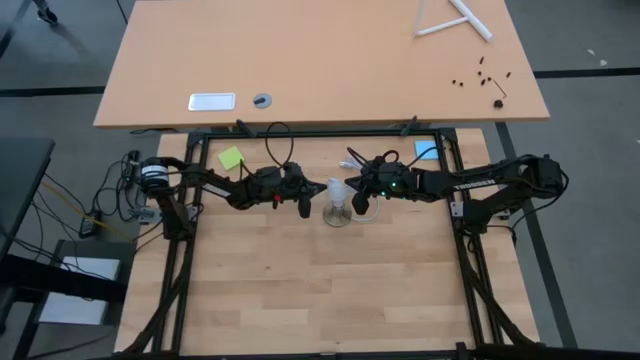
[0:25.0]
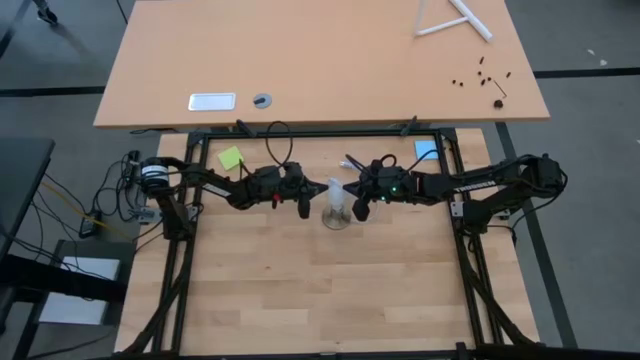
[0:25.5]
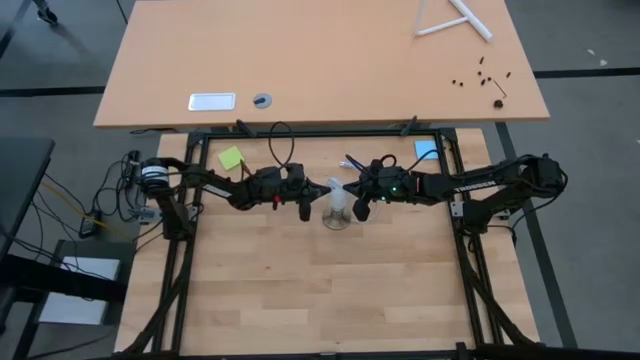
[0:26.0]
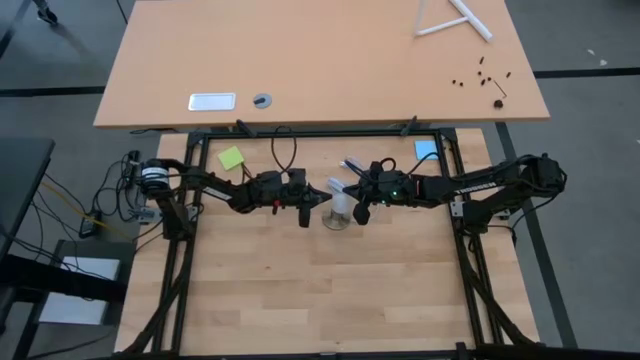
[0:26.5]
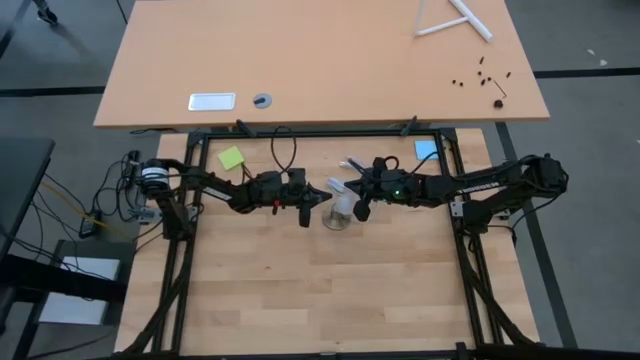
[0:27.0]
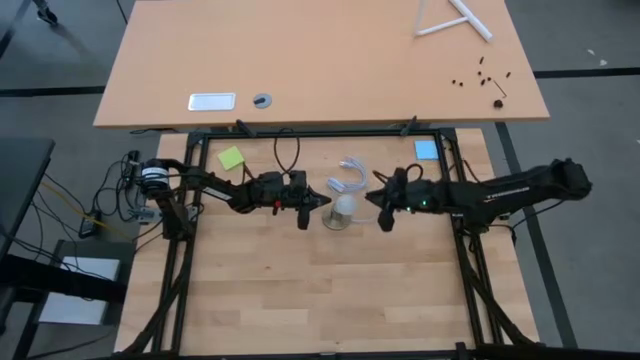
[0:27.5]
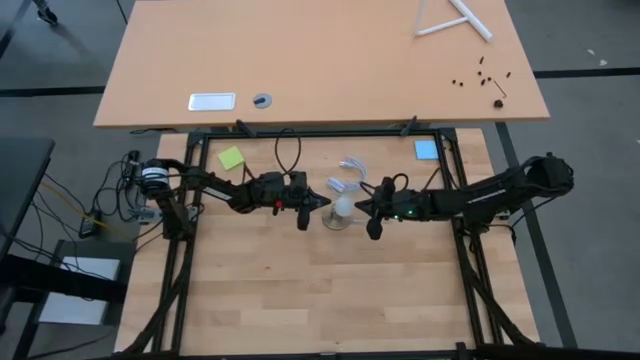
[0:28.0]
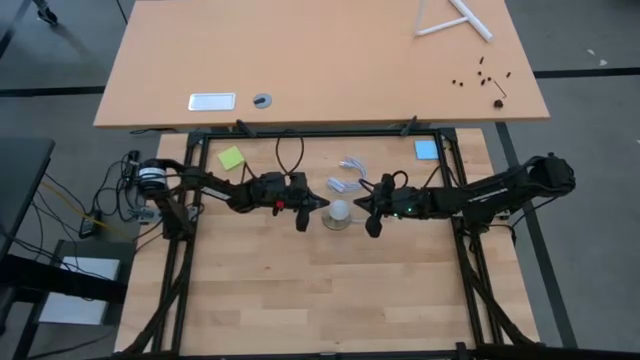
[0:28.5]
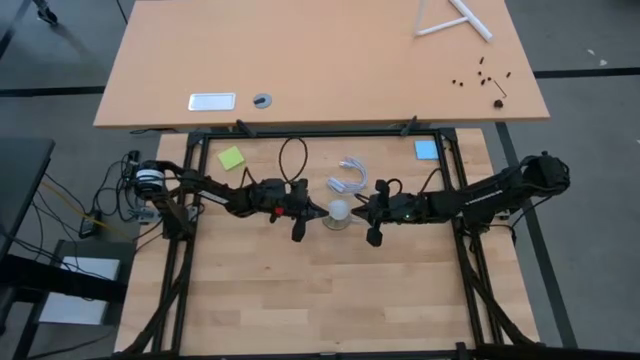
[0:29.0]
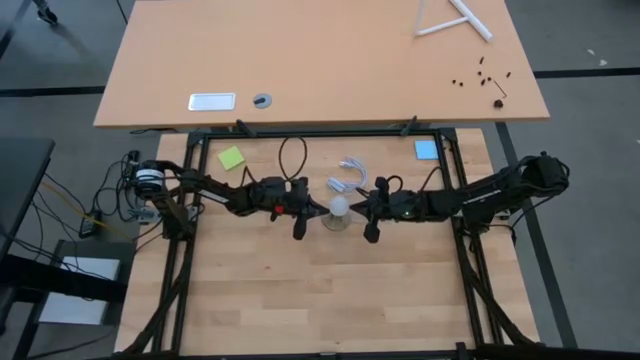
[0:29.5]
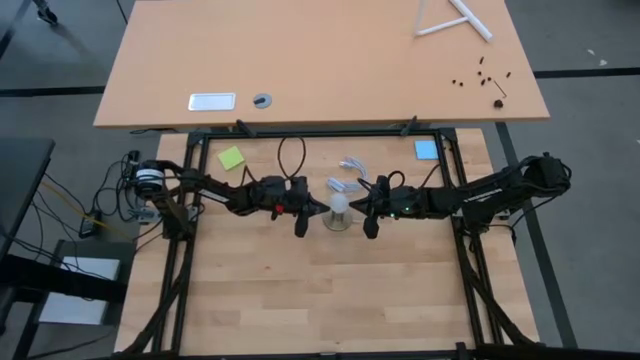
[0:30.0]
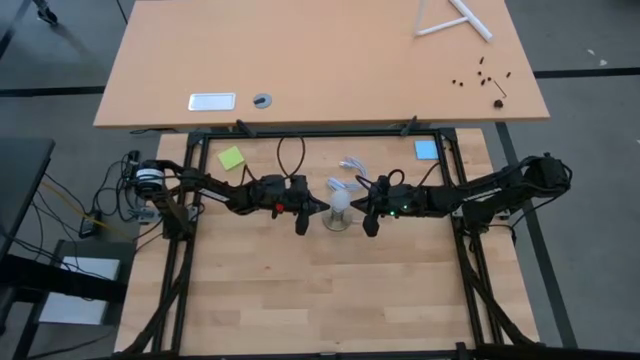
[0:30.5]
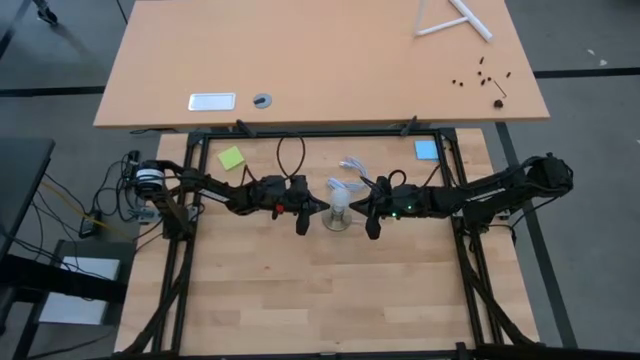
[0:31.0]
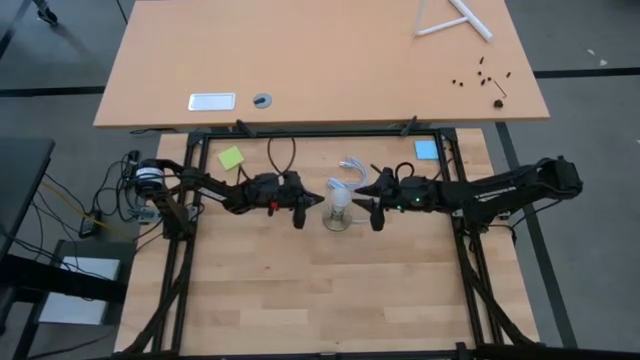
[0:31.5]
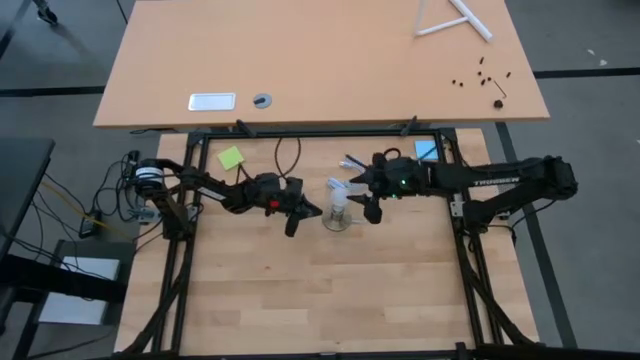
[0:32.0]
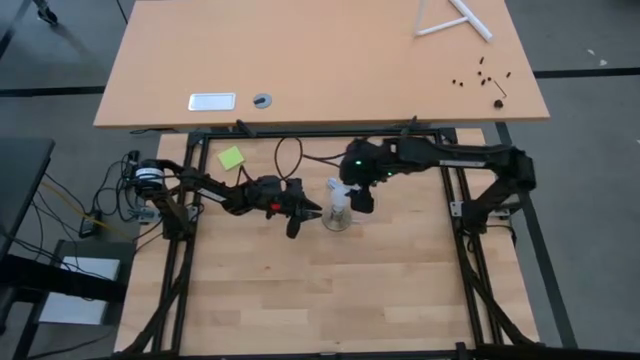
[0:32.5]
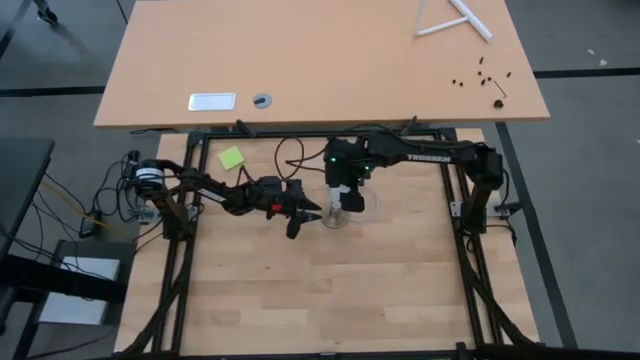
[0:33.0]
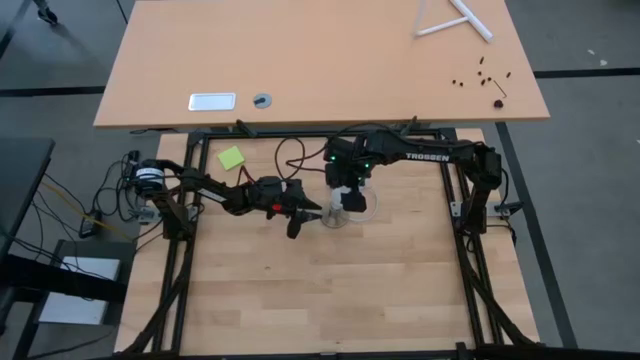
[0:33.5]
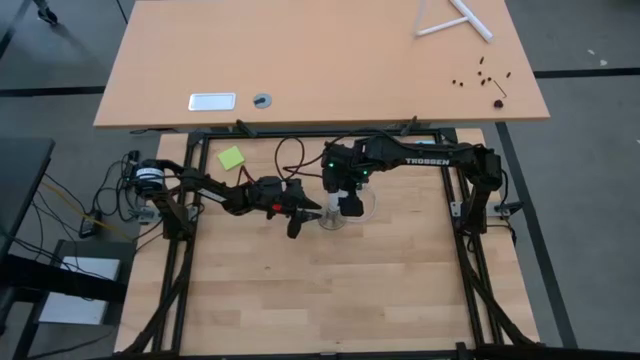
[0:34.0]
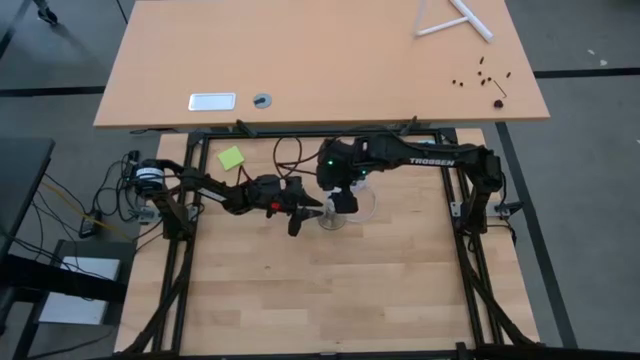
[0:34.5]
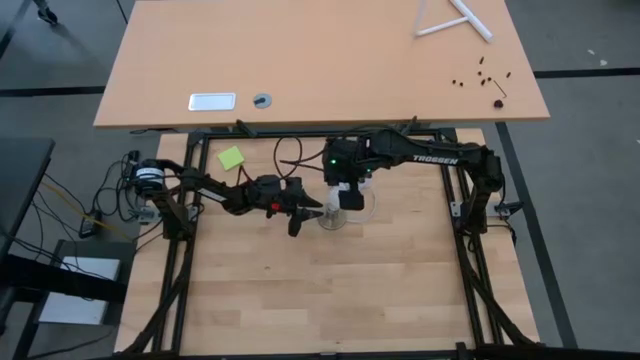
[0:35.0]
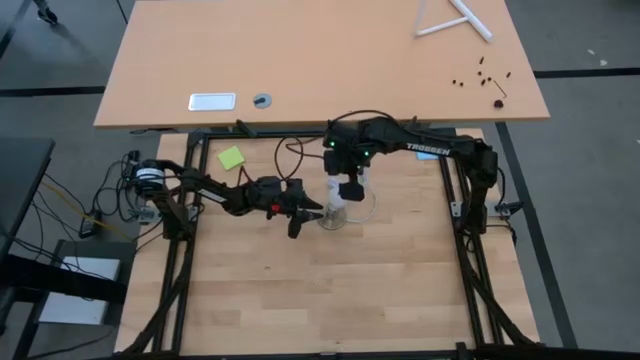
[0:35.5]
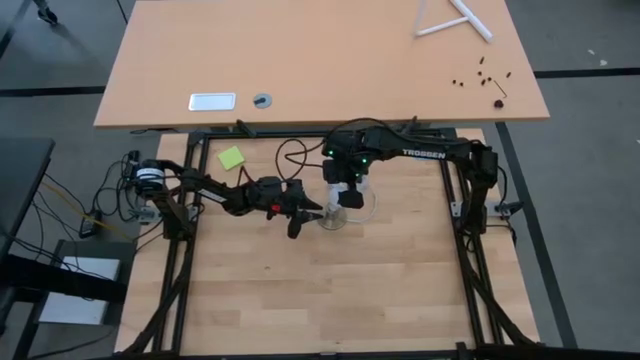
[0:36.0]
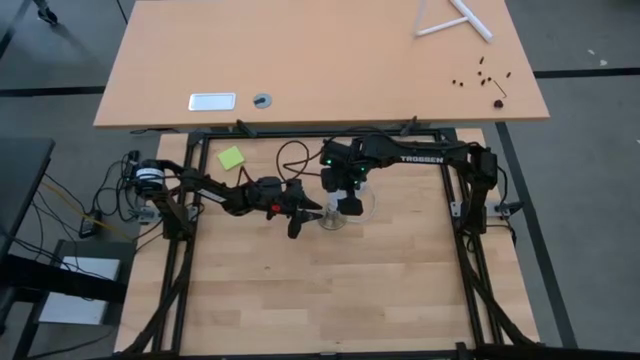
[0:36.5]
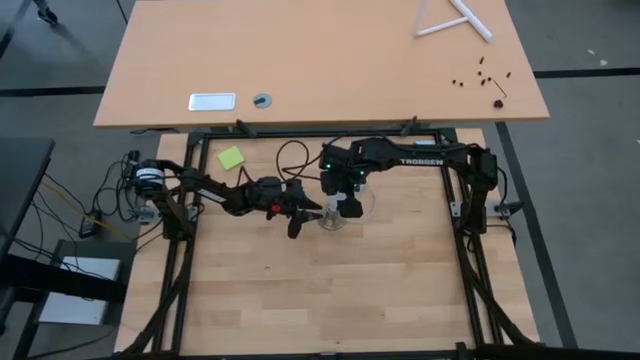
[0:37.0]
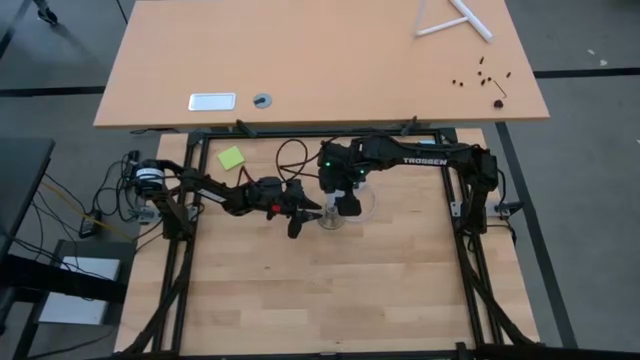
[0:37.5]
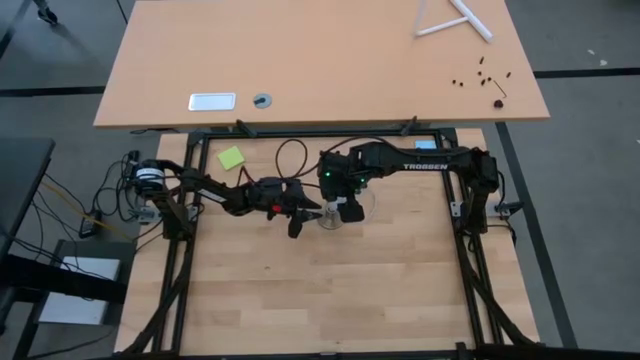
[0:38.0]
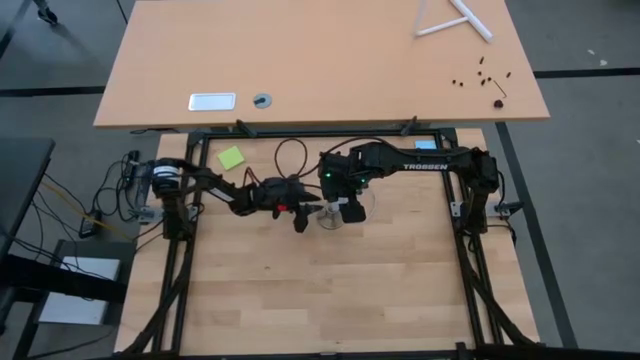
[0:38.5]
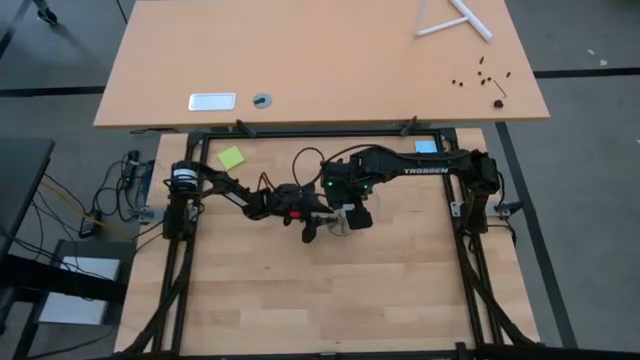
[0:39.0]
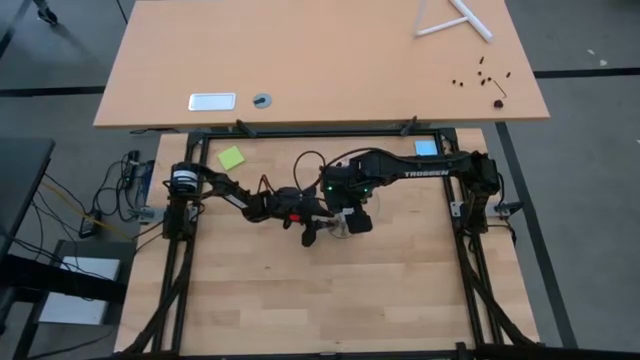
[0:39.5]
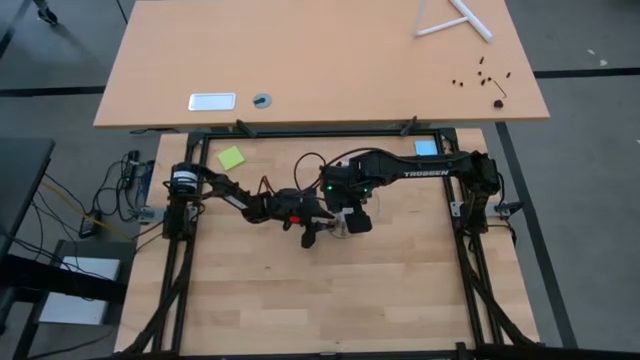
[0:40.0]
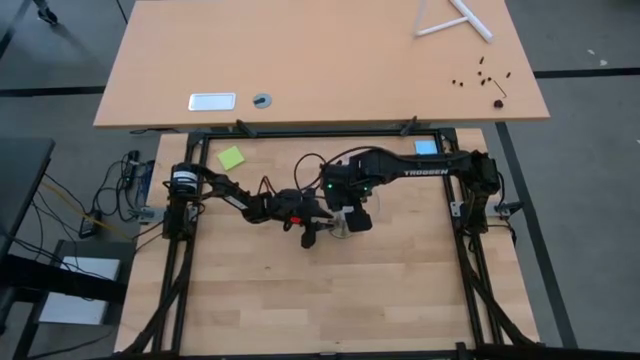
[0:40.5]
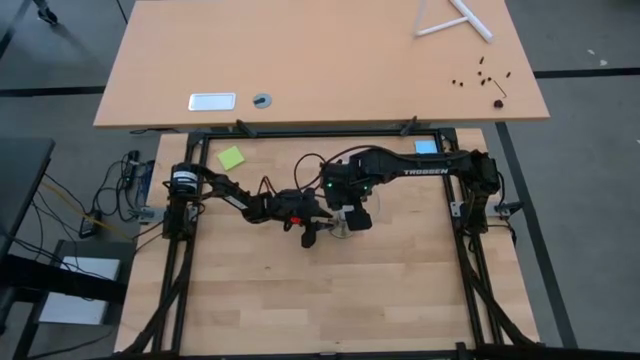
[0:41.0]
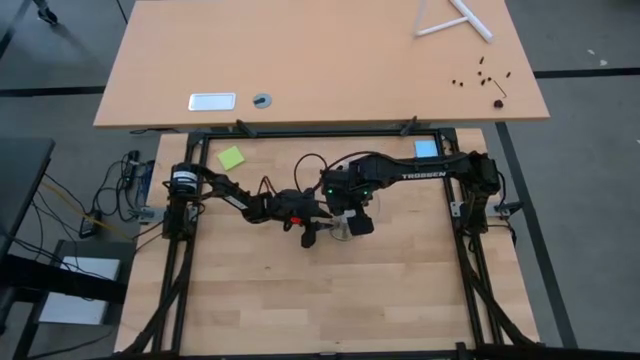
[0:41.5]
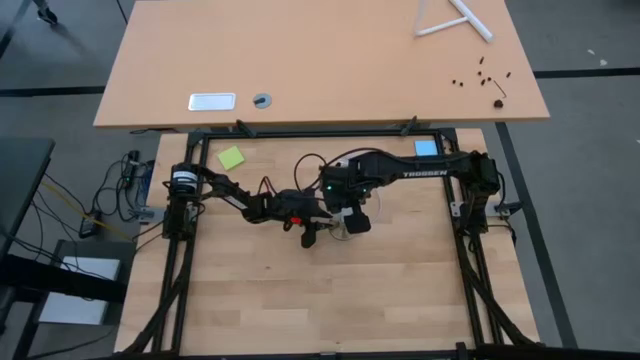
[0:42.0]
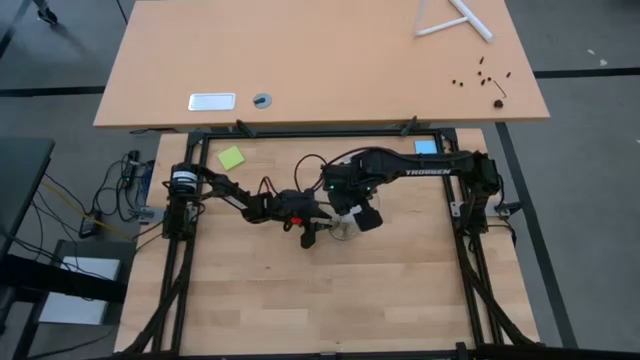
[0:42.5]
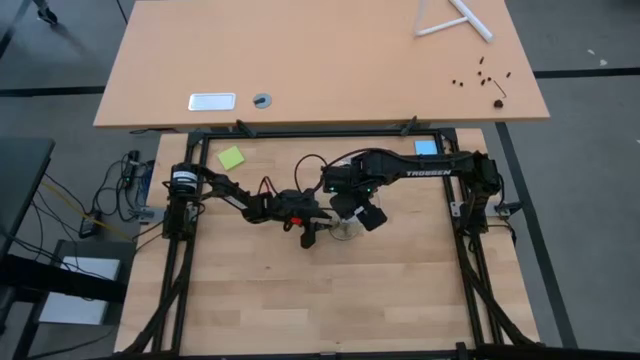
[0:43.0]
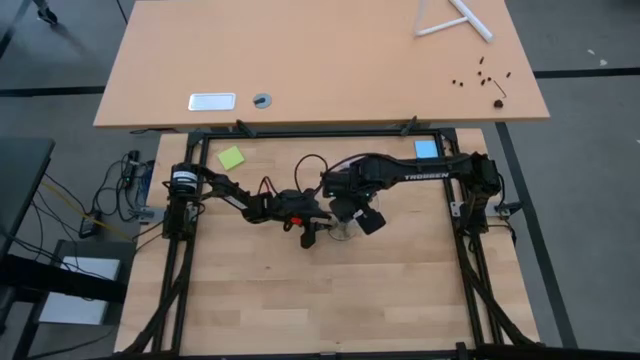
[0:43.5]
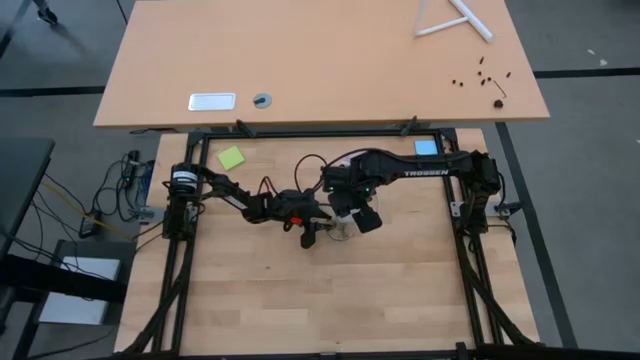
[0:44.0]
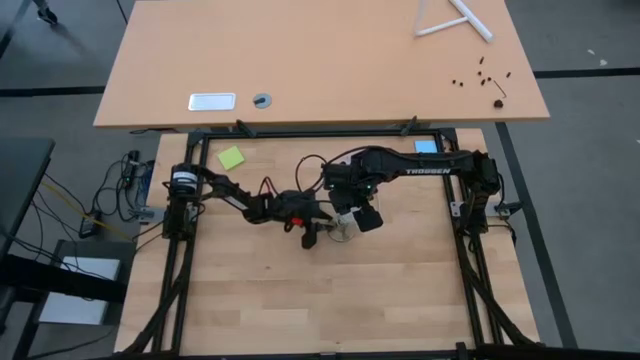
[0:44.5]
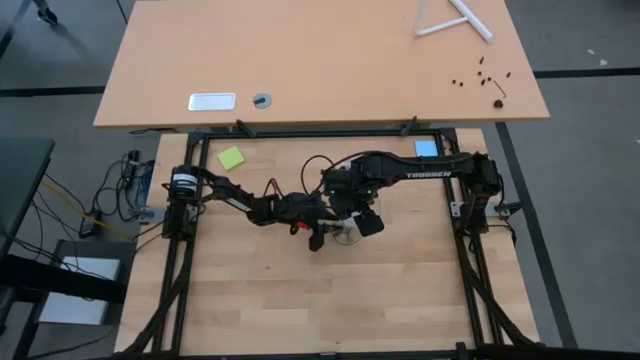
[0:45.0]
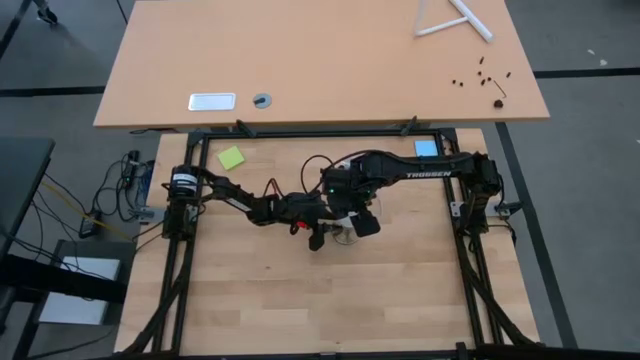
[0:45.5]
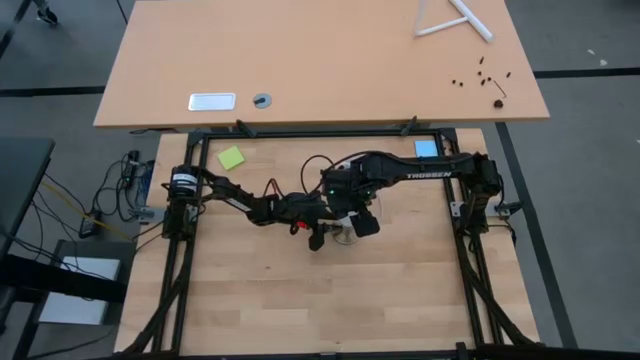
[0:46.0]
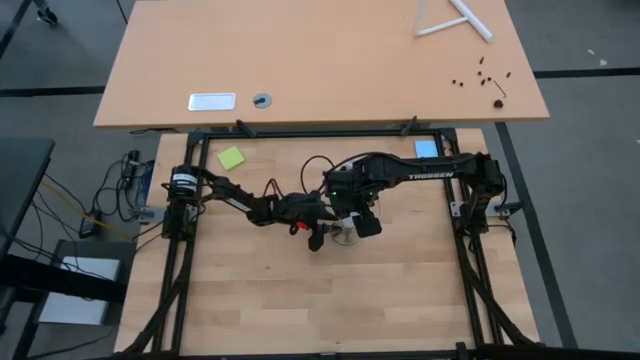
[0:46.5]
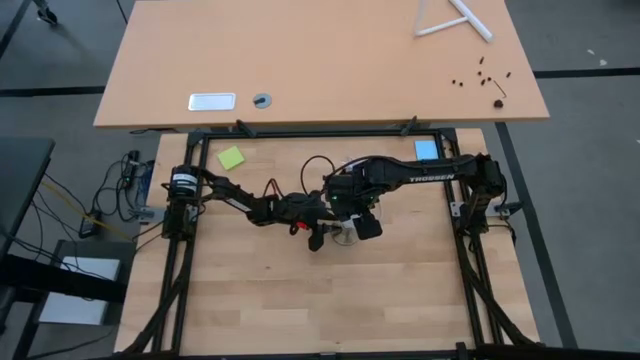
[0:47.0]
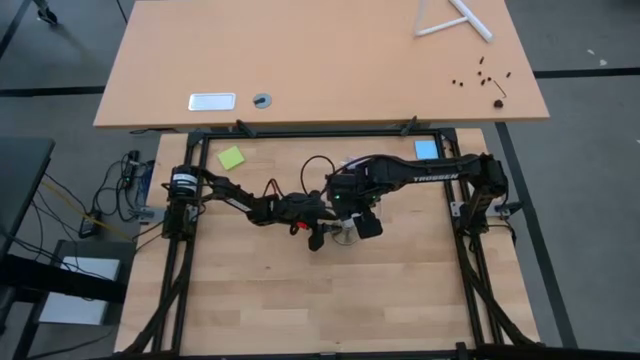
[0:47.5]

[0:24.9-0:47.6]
Task: Screw lightbulb
Insert the lightbulb into the lamp
